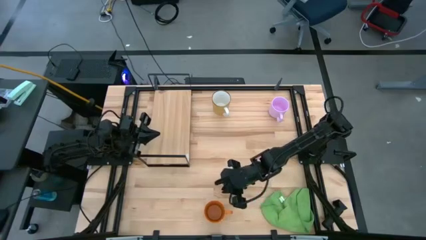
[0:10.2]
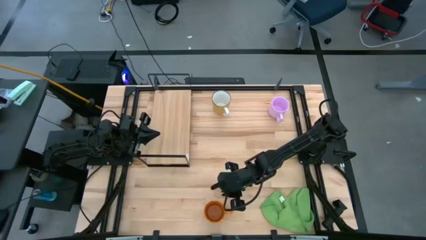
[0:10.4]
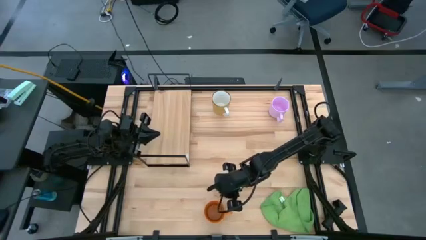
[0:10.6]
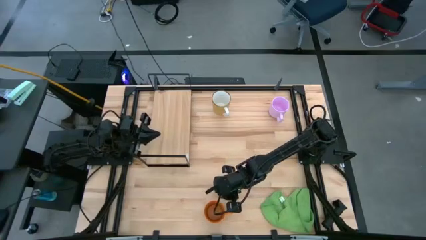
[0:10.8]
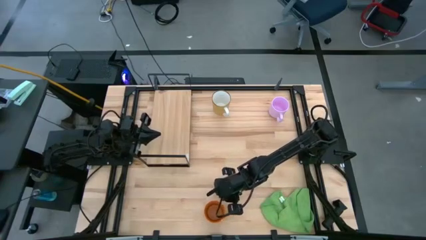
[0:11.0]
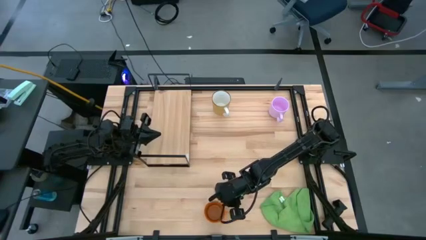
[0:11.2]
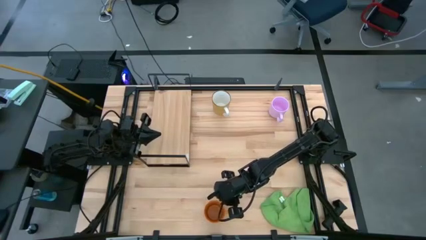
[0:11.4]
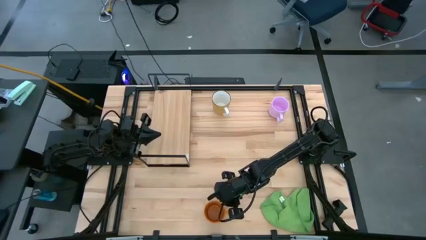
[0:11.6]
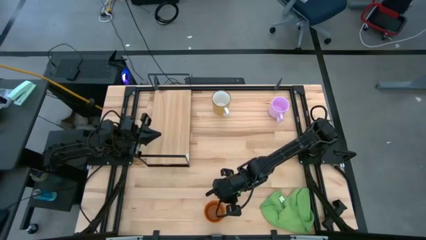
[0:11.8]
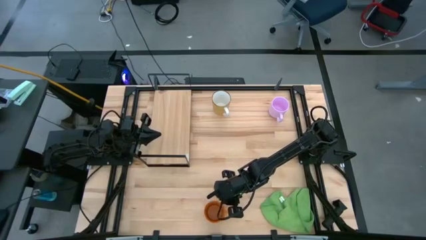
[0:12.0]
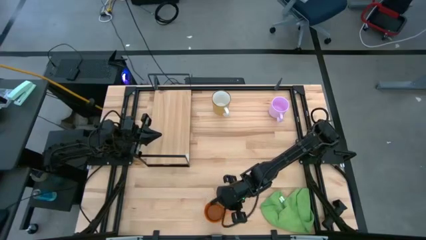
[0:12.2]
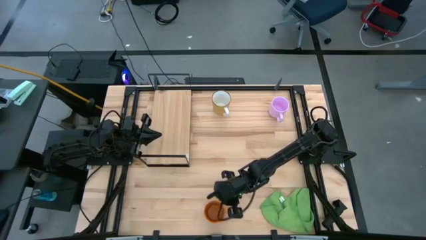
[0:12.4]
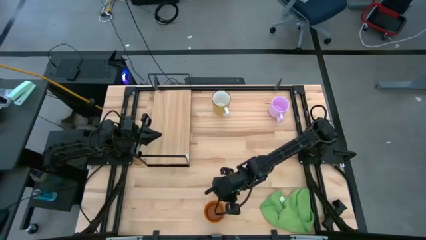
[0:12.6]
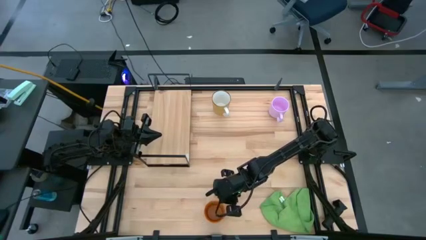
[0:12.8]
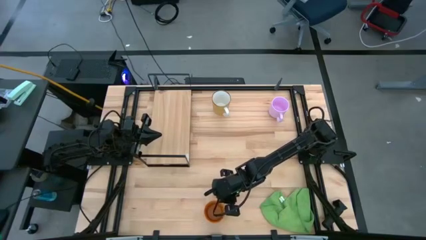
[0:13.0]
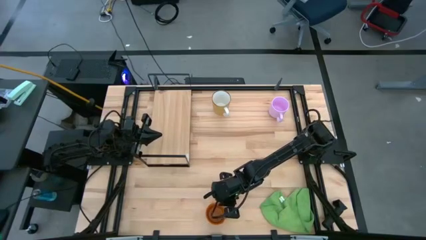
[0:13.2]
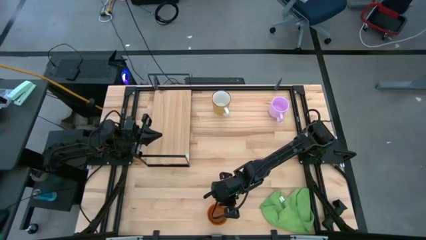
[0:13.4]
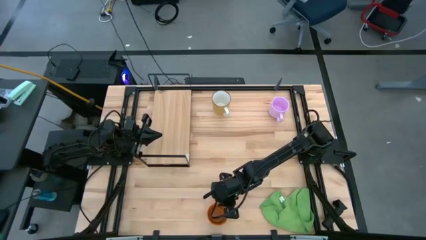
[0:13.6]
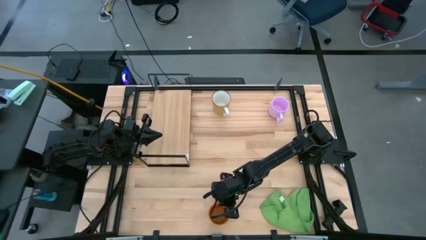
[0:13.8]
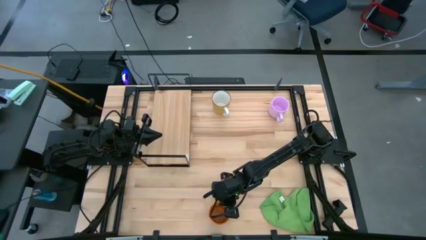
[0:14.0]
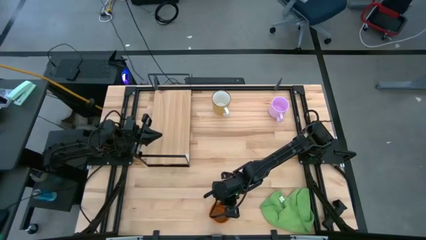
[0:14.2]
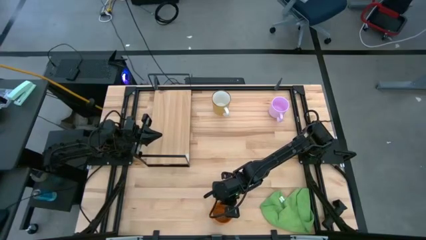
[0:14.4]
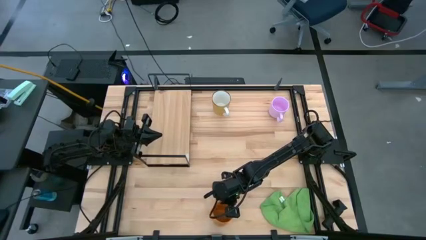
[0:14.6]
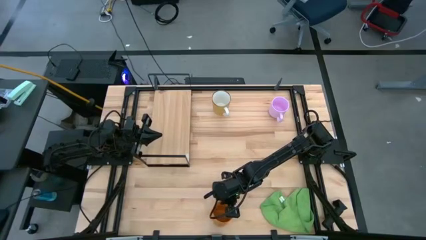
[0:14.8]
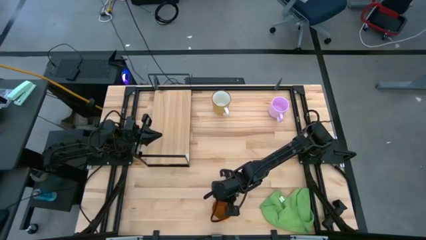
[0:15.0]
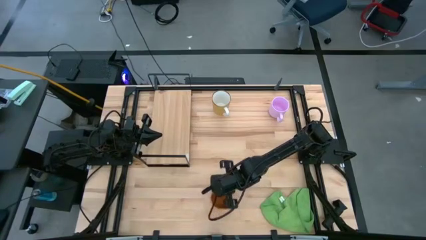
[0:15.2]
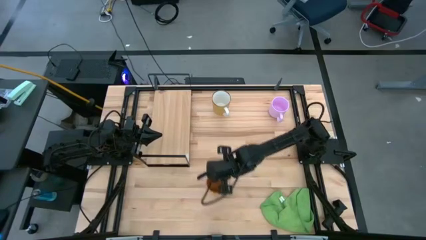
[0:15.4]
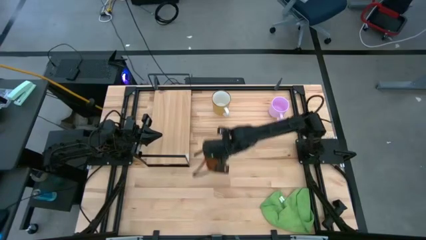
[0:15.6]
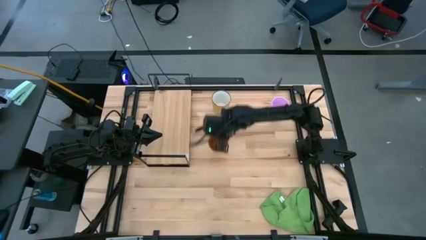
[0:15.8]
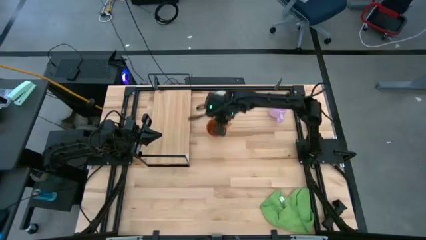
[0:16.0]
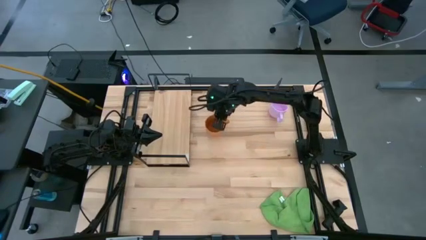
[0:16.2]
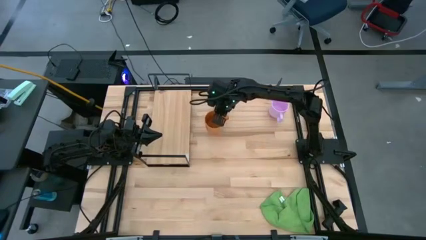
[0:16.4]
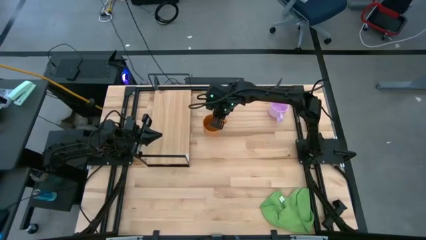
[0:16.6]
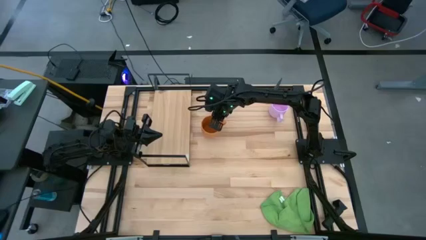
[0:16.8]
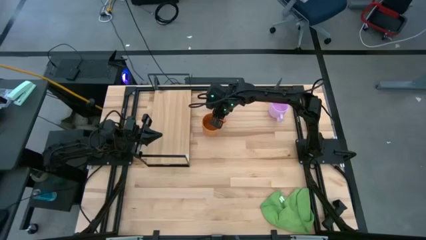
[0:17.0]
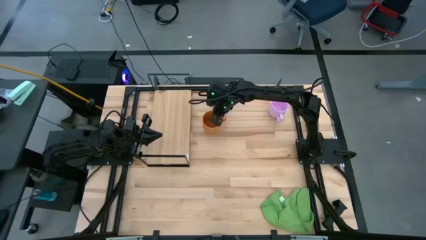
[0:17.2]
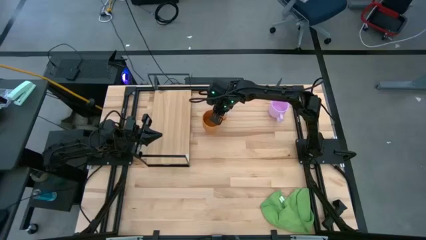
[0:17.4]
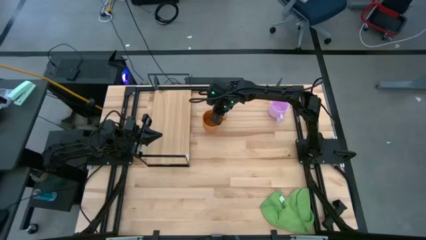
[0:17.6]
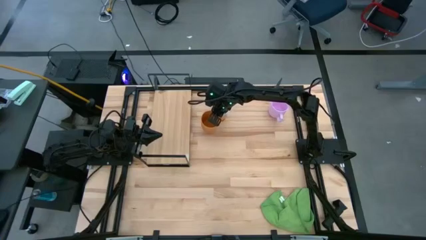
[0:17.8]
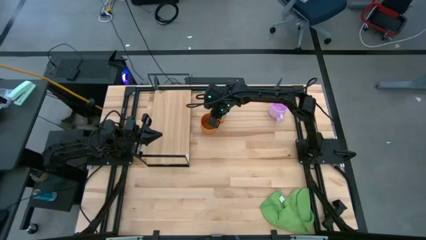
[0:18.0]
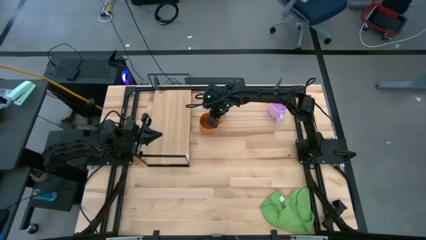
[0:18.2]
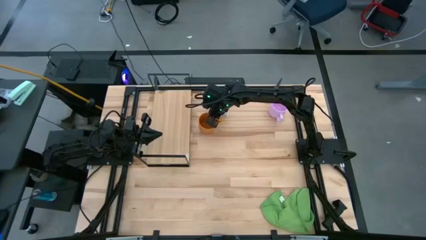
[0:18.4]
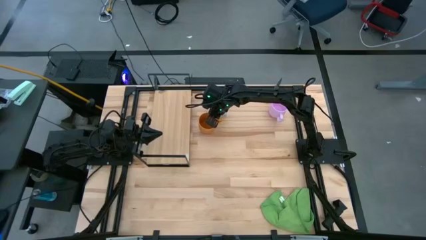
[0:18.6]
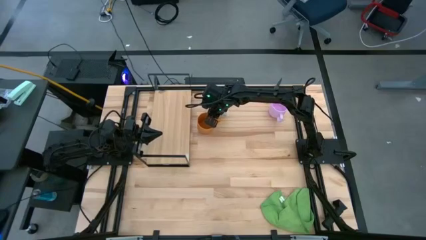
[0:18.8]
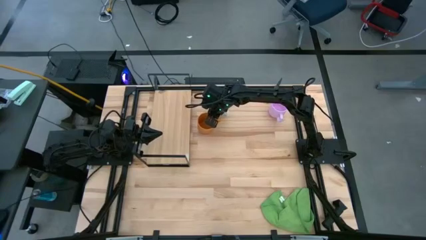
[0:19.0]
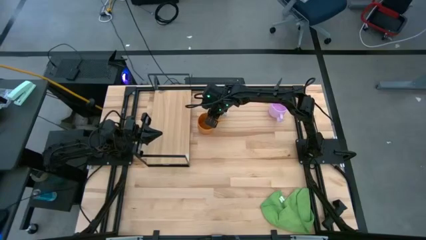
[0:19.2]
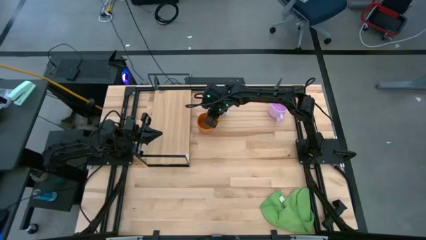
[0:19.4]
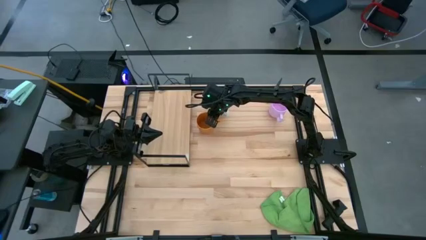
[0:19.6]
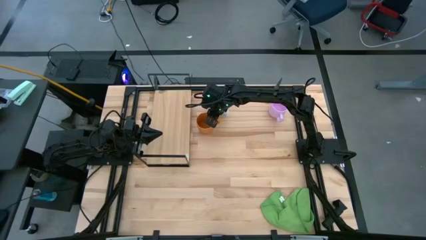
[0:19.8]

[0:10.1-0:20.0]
Task: Stack small to large cups/mugs on shelf
Move the orange mug to the top middle of the table

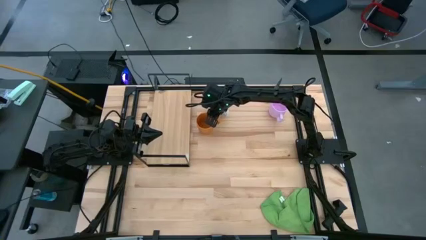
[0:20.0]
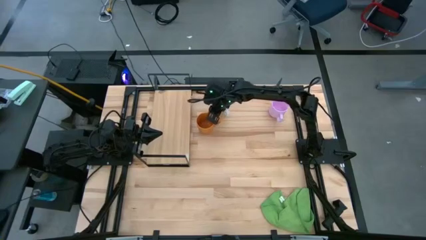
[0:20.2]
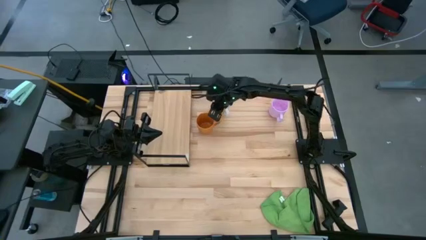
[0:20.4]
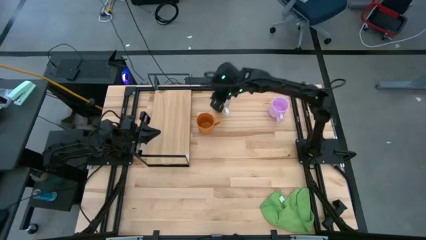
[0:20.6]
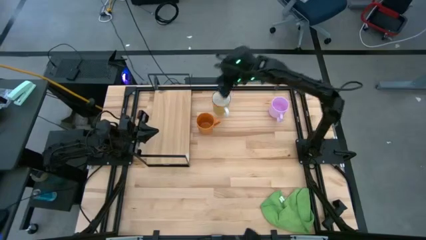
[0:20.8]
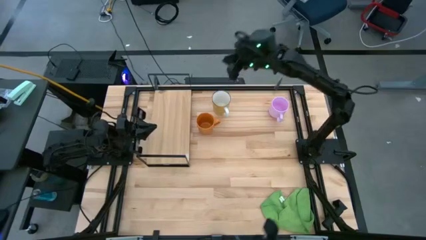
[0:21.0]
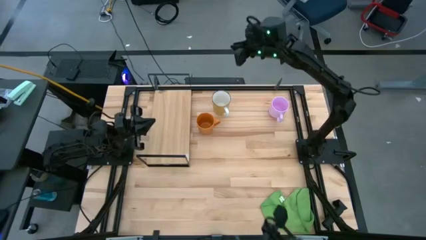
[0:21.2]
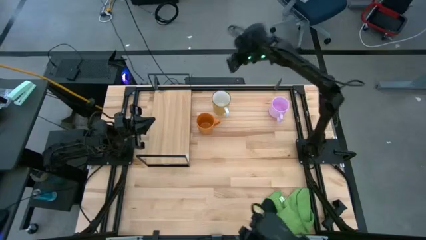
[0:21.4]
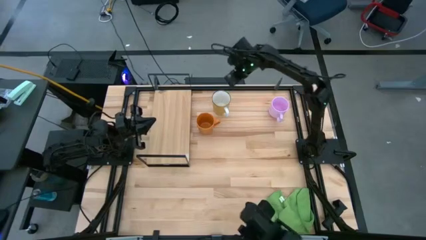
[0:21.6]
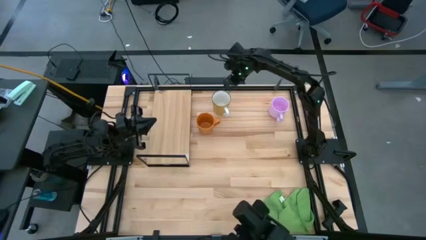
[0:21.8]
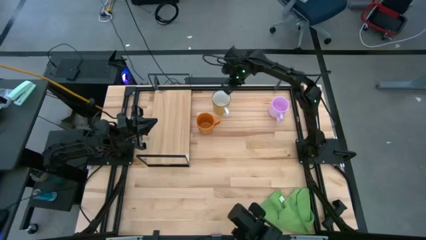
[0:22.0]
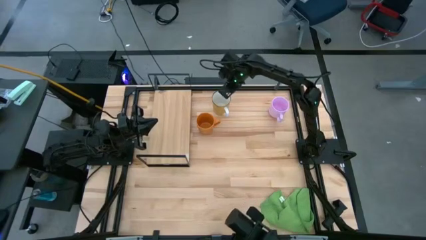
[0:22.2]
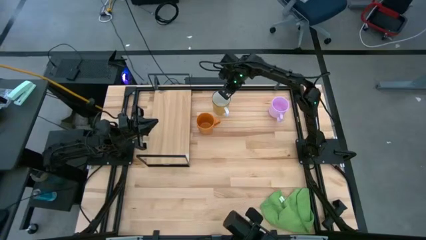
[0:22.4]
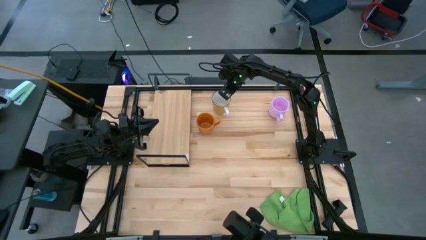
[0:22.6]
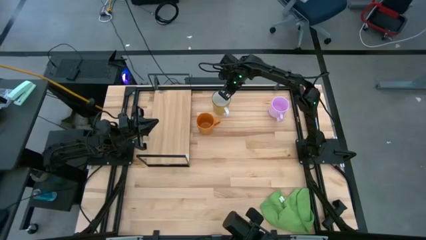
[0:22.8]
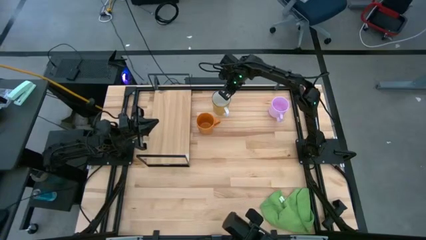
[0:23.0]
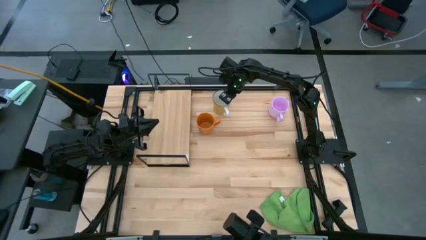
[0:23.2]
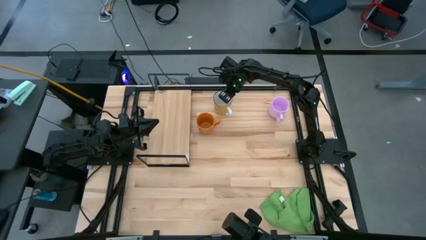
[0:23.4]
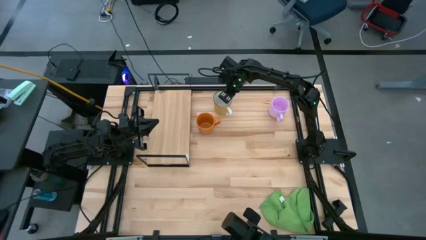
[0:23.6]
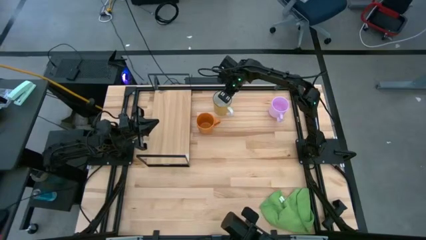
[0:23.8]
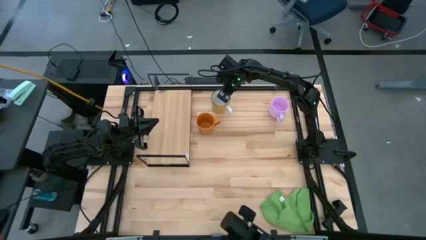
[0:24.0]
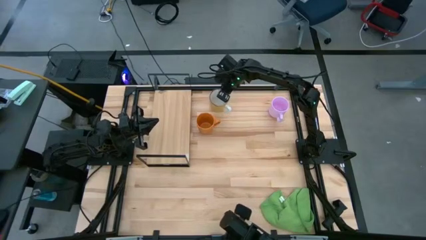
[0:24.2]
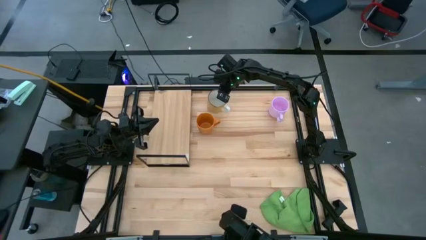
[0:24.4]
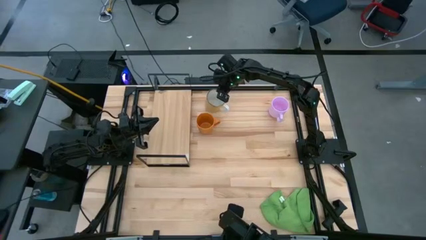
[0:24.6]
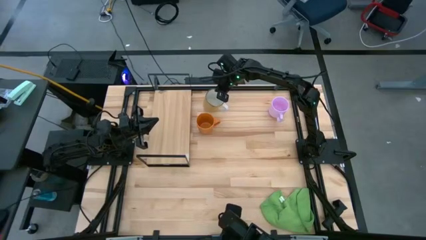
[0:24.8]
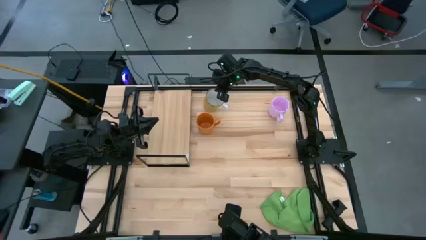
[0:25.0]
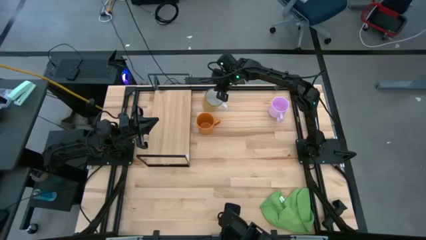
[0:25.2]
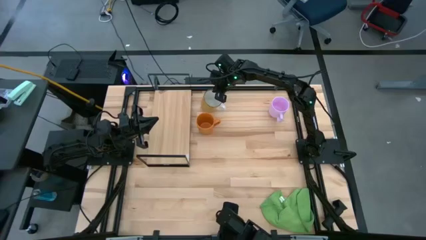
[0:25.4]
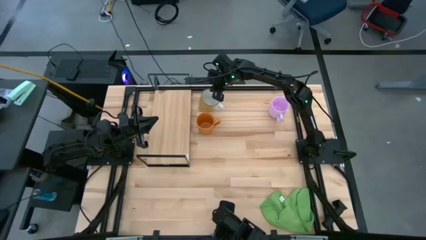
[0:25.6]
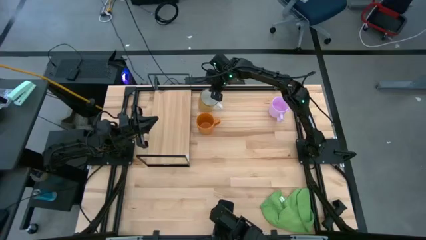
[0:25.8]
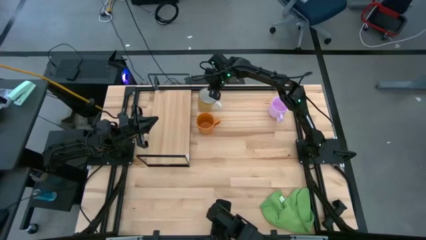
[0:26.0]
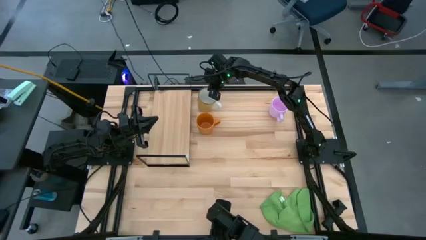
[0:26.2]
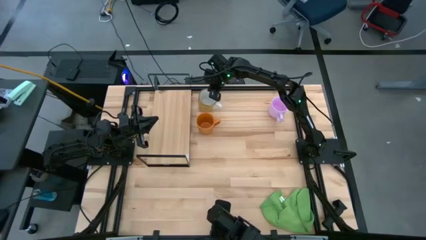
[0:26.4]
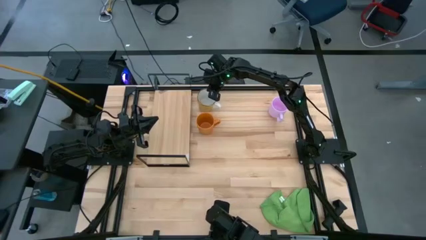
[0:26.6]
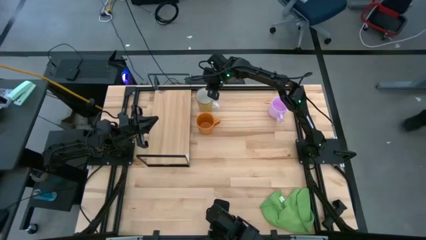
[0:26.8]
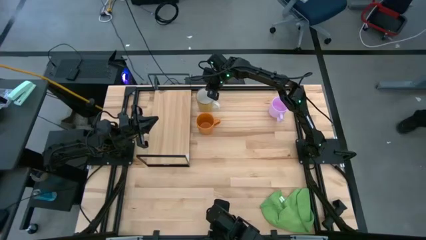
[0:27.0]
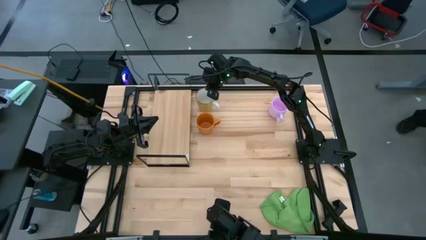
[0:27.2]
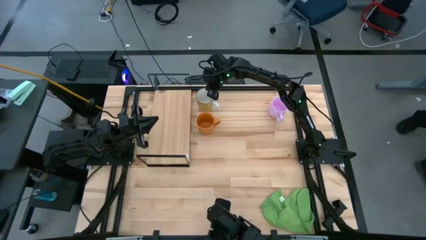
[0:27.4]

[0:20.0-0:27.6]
Adjust the yellow mug
